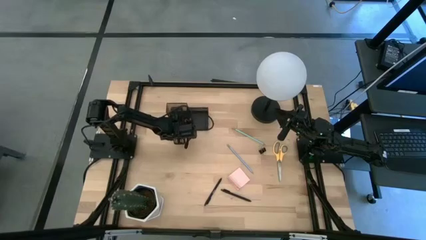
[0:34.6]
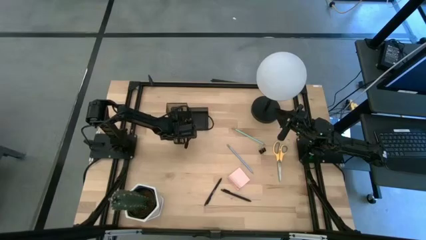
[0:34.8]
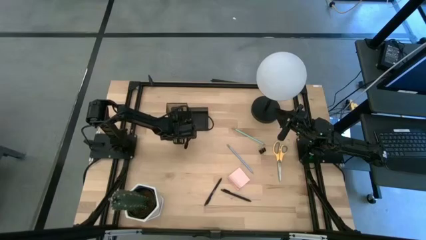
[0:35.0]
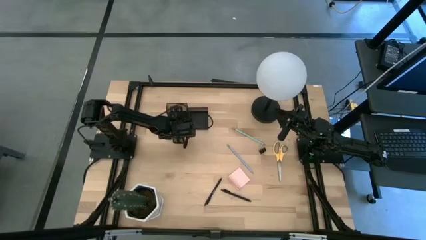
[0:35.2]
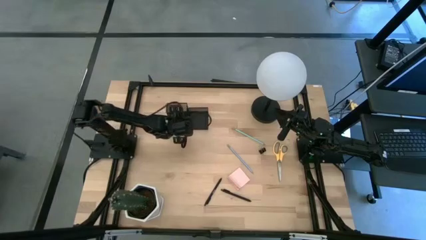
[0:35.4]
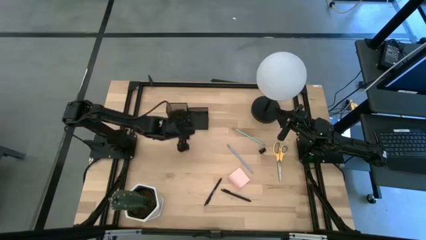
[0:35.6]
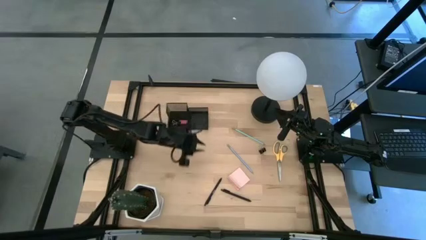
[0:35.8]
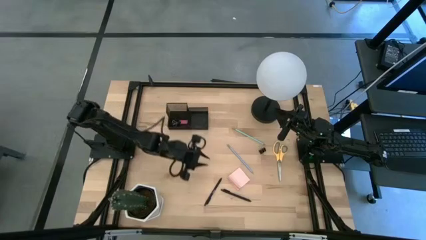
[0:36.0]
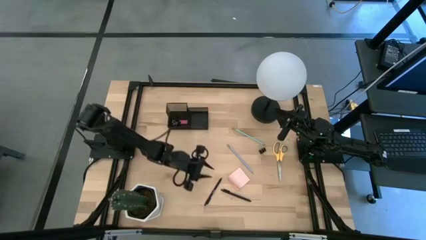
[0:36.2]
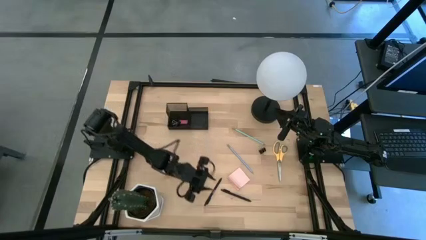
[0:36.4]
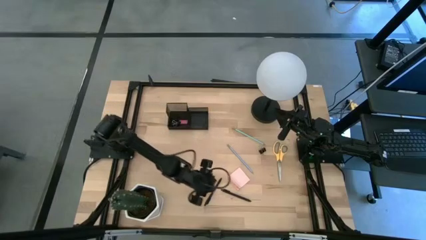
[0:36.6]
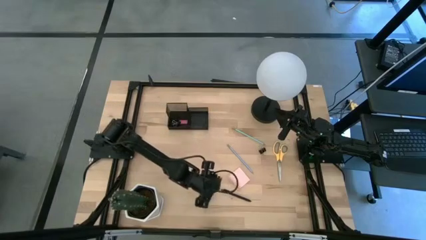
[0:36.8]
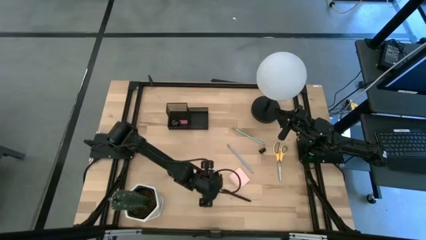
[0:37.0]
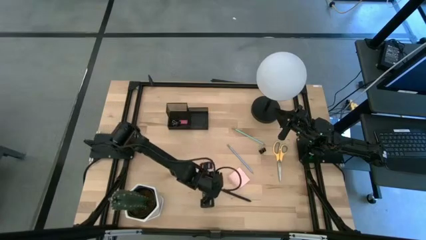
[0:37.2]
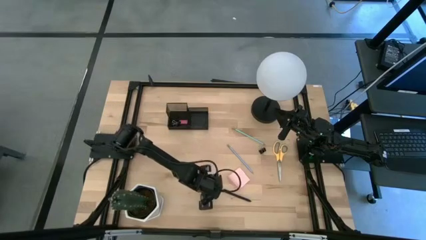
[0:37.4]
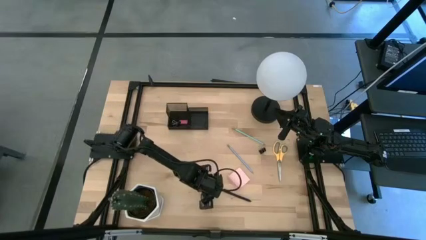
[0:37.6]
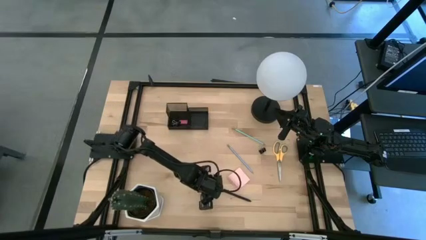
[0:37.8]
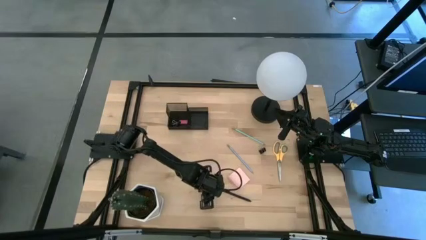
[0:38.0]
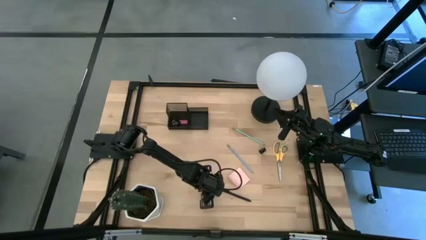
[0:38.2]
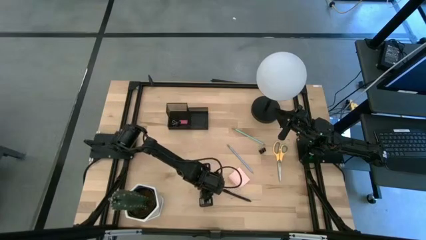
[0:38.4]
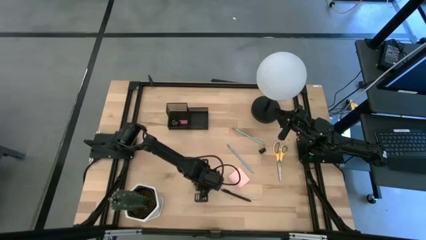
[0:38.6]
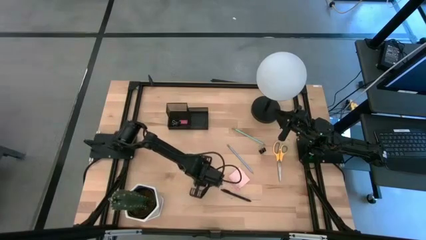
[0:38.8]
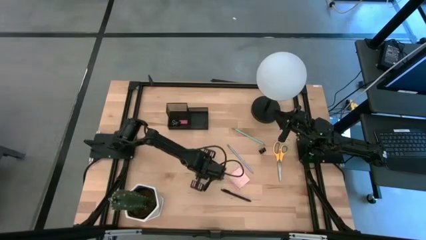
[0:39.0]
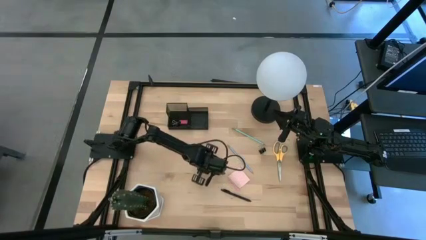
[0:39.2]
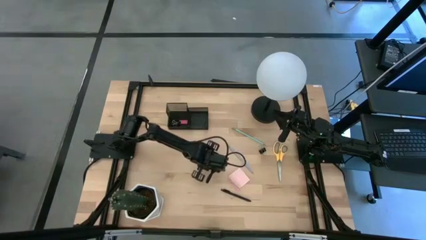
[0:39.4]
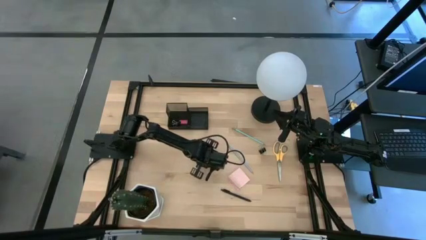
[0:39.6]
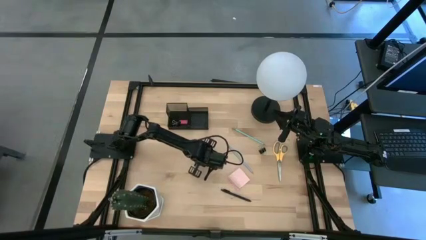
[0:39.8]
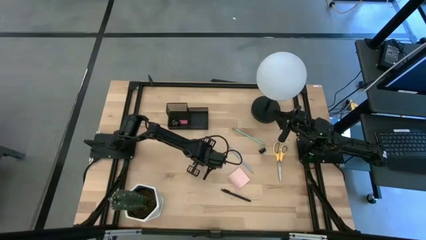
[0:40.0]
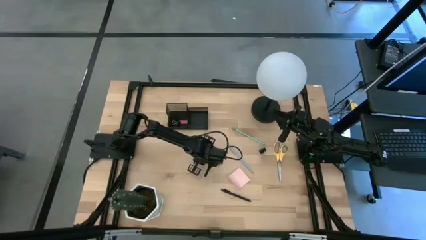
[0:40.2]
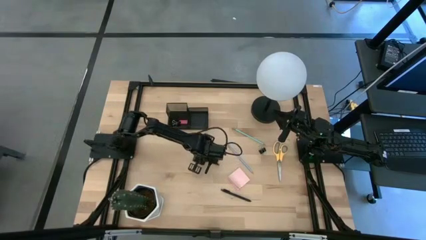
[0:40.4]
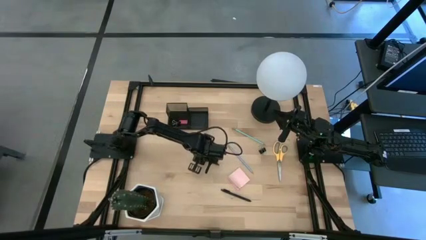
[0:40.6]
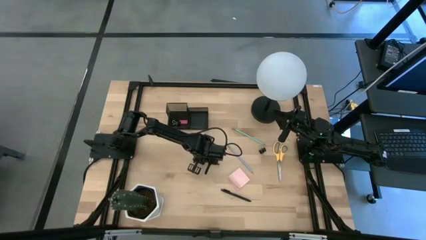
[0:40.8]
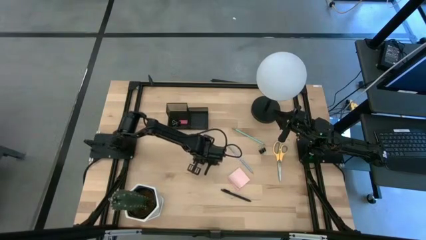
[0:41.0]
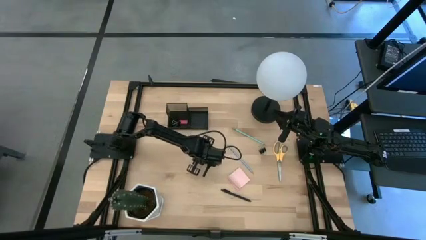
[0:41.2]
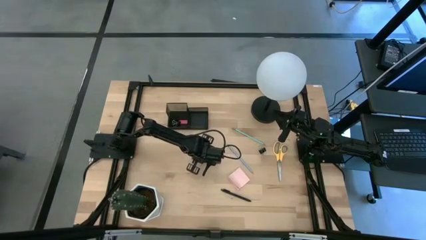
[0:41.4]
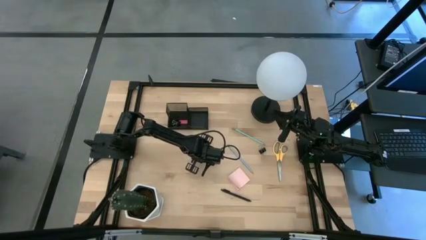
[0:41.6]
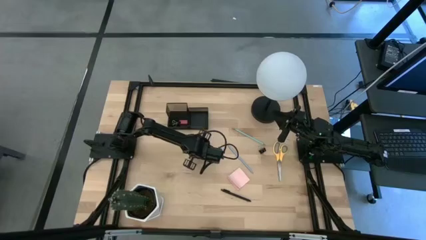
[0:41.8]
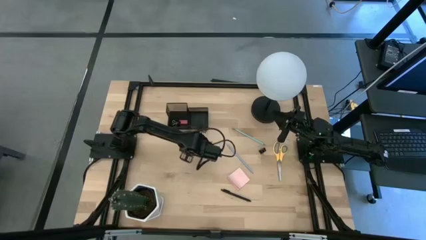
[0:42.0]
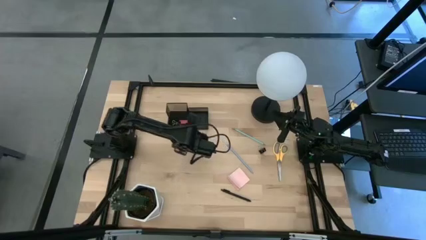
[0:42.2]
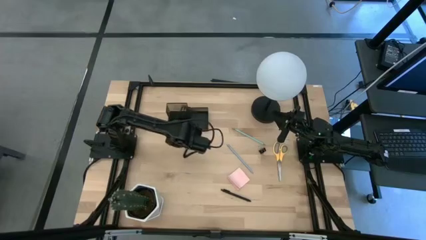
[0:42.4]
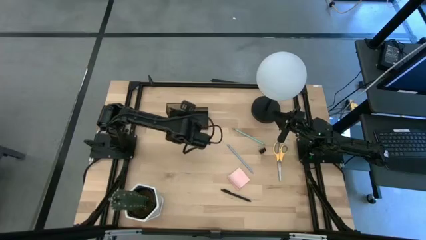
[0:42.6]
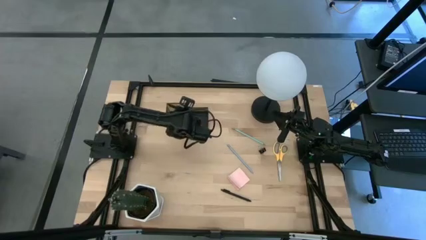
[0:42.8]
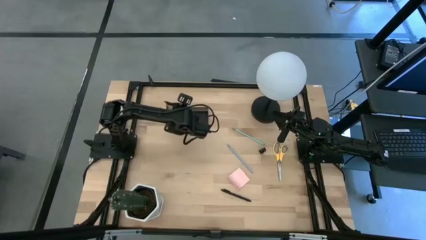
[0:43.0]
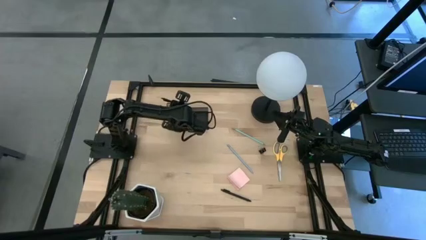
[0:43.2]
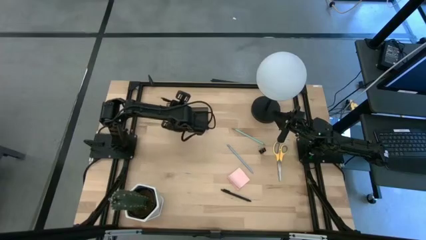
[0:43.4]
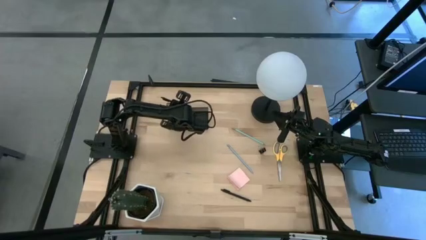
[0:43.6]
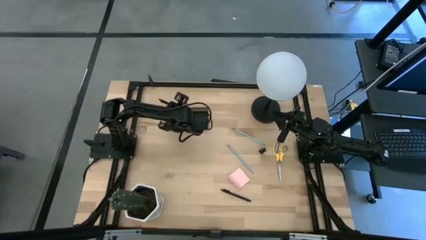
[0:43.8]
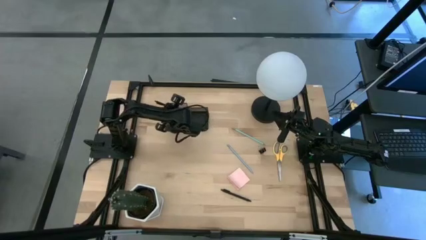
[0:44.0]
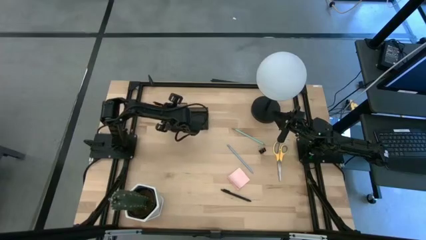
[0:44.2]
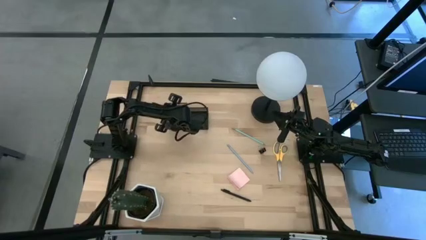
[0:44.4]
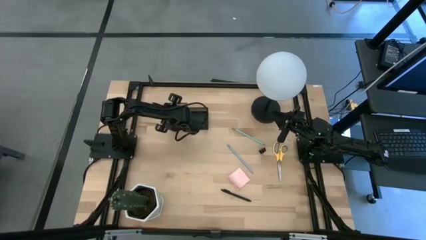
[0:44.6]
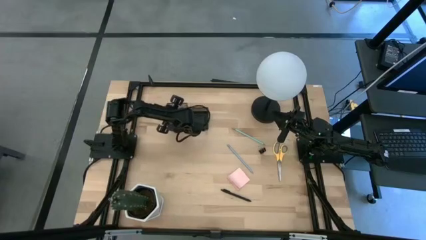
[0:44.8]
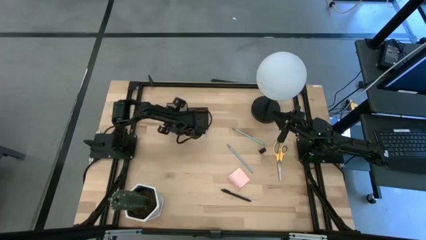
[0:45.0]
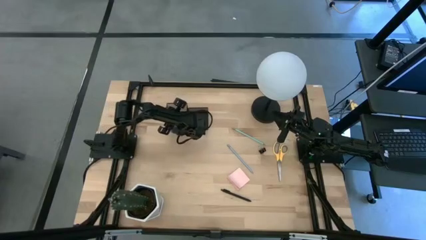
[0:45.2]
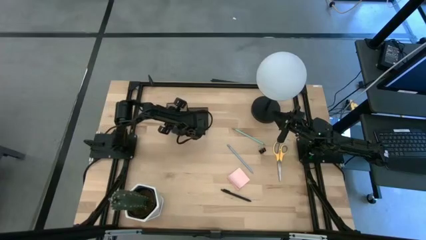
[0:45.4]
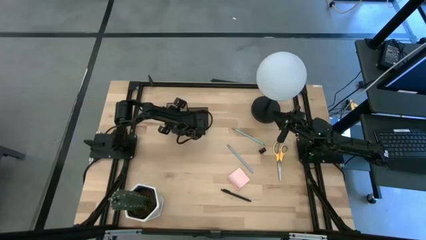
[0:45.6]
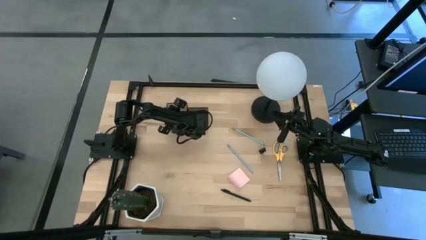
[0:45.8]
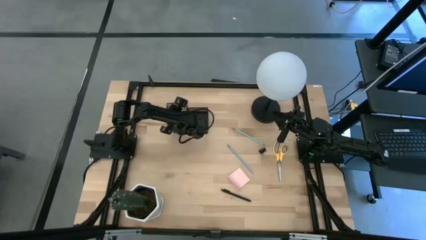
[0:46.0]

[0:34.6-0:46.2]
Task: Pick and place office supplies into organizer
Put the left black pen into the desk organizer

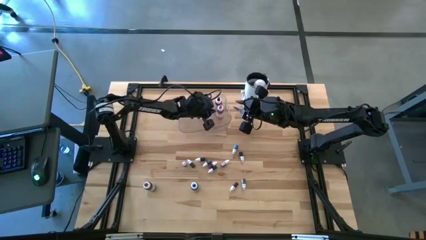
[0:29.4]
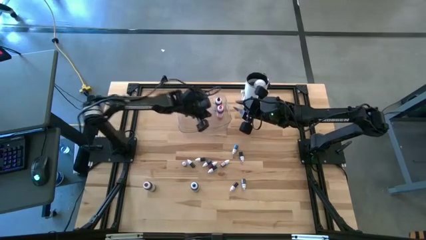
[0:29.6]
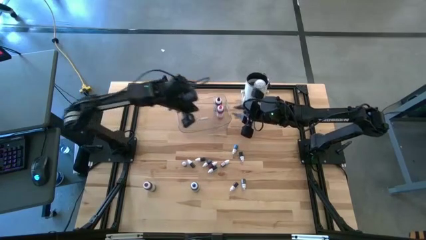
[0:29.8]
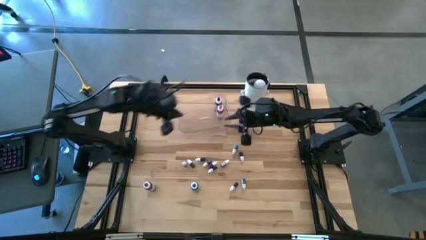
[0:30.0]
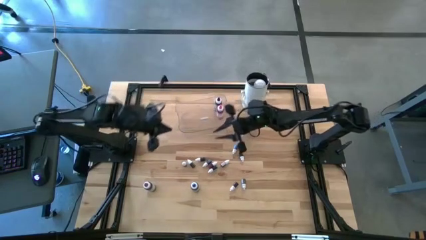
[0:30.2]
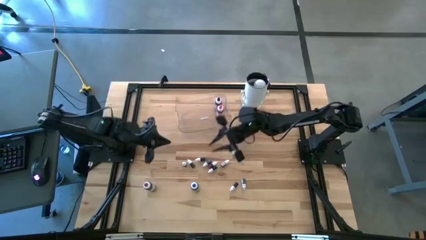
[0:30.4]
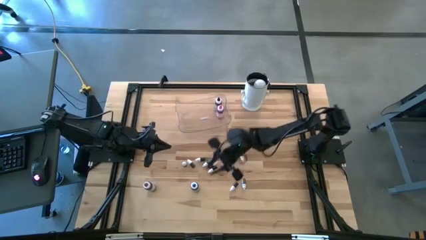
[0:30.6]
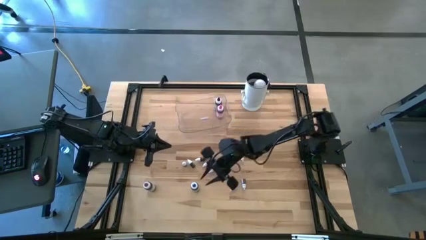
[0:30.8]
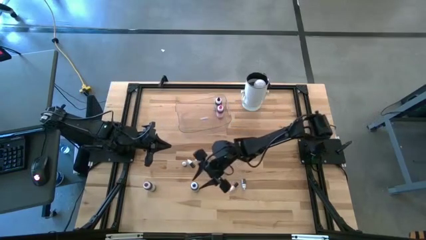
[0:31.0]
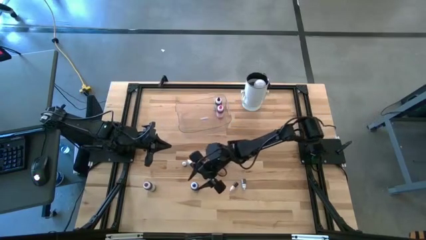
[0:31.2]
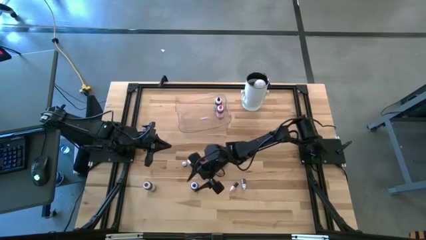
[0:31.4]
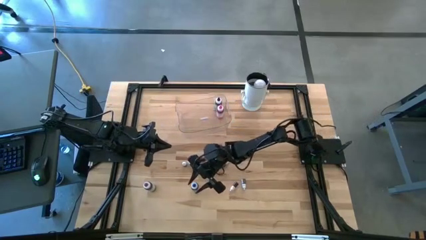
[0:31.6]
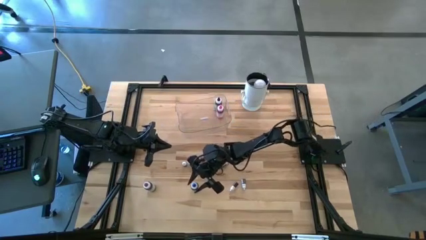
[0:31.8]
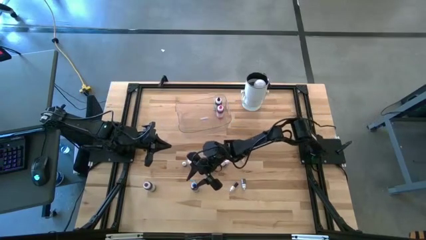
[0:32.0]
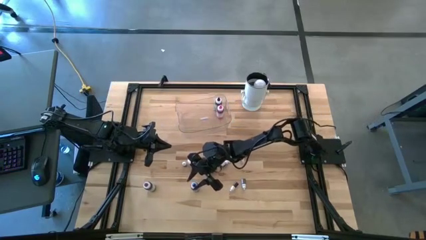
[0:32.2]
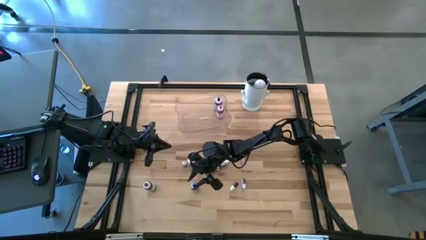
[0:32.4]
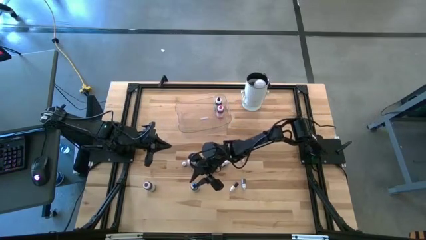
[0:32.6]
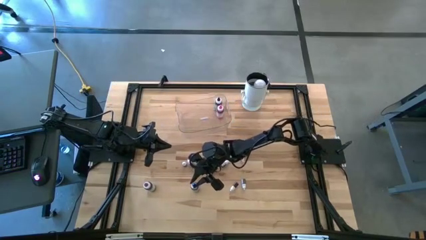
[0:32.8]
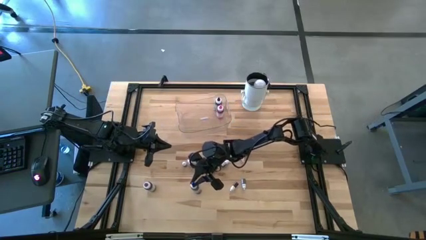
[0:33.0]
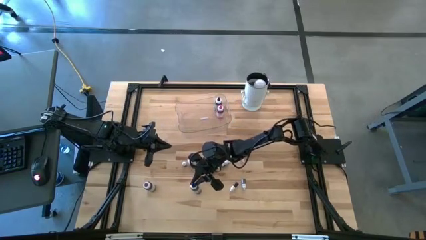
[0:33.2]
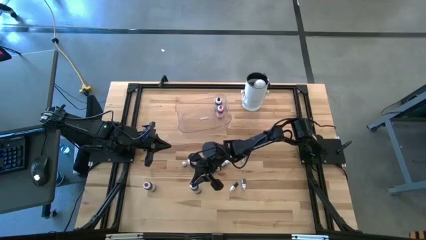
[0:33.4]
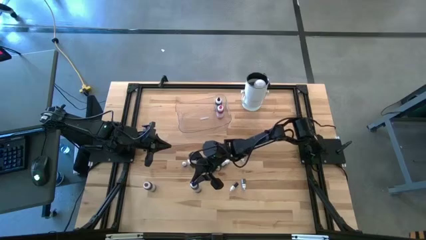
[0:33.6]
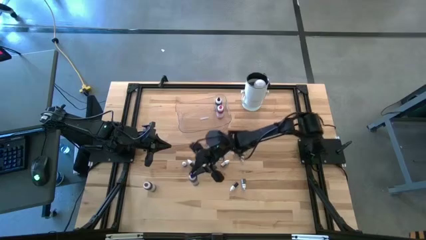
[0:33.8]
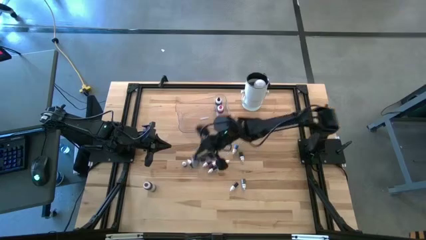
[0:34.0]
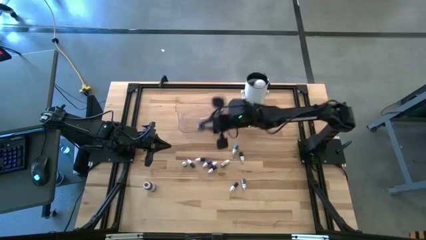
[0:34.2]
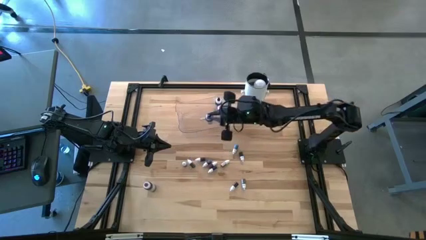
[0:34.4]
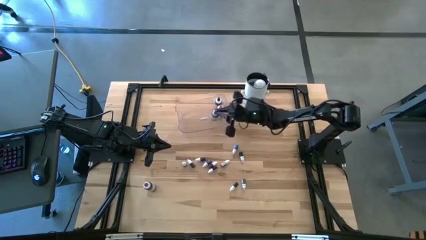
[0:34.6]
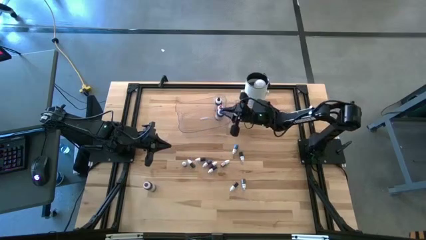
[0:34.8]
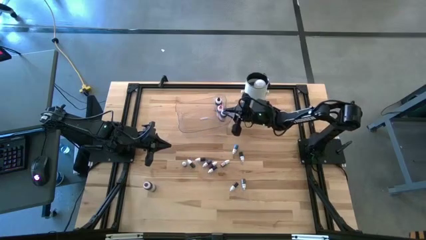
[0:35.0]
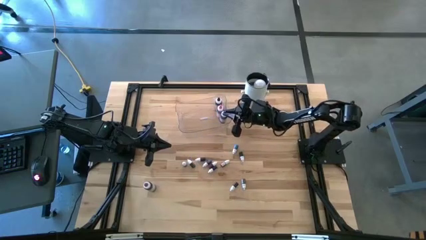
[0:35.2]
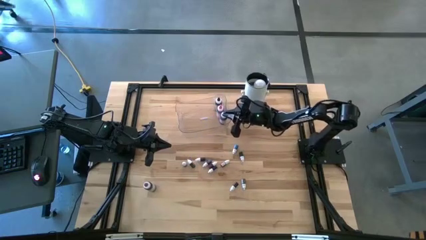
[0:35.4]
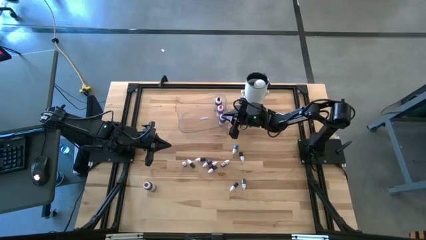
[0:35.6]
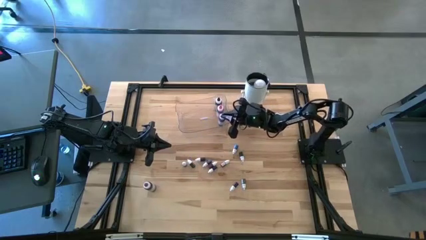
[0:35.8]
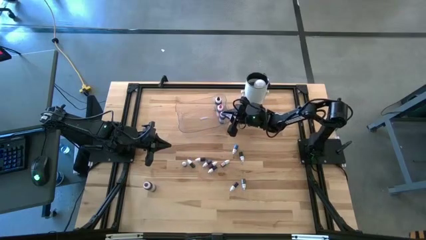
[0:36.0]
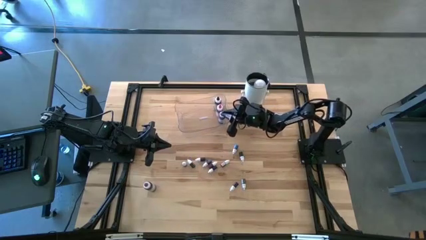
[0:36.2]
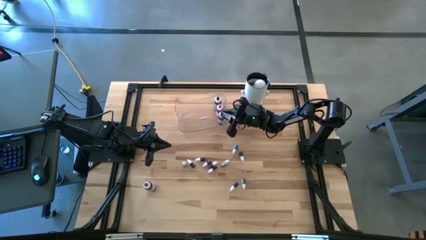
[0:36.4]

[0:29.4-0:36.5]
Task: Pick & Place food coloring
Put the large blue food coloring bottle into the transparent container
